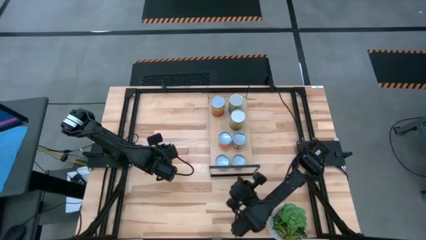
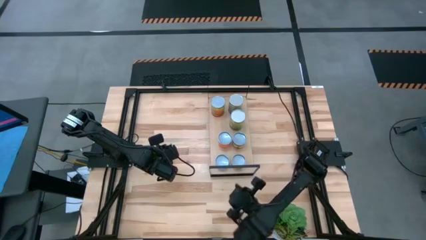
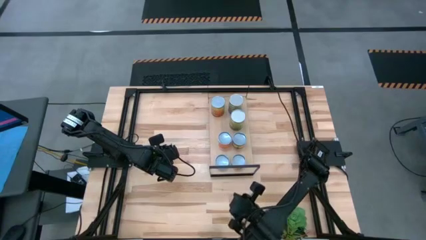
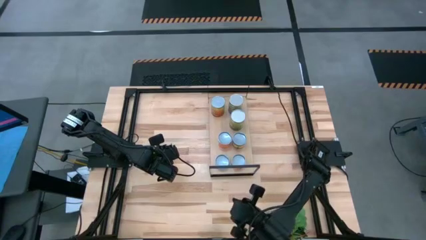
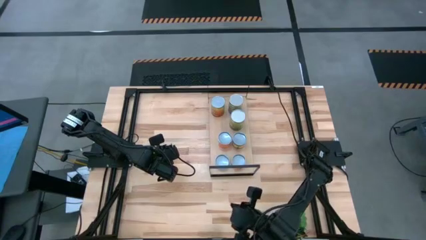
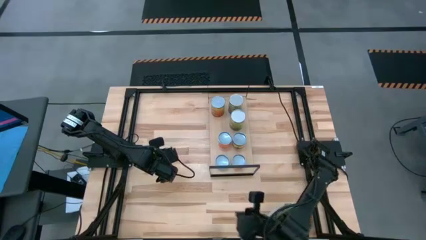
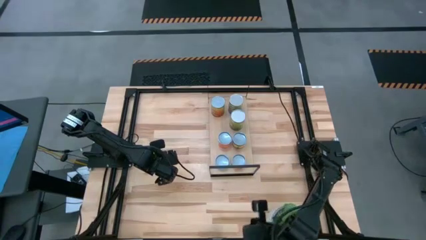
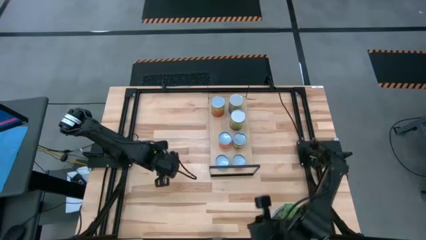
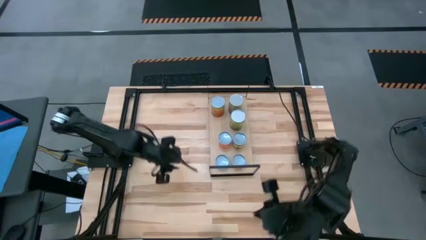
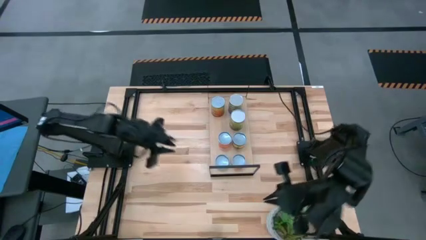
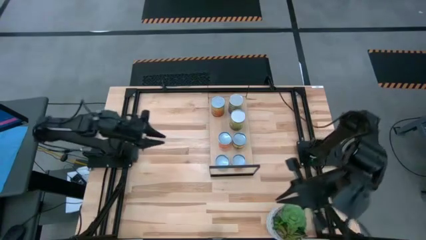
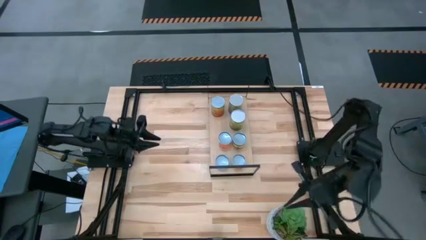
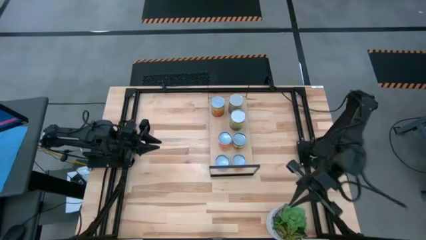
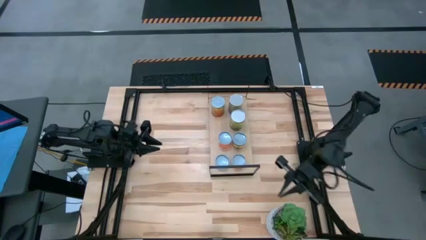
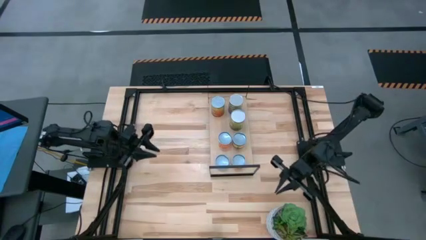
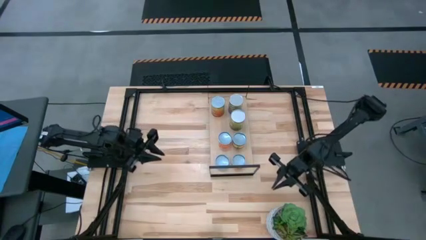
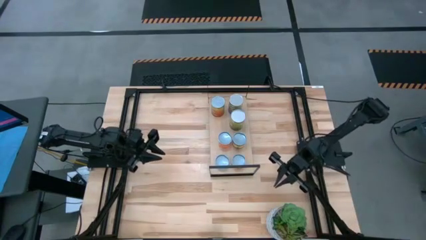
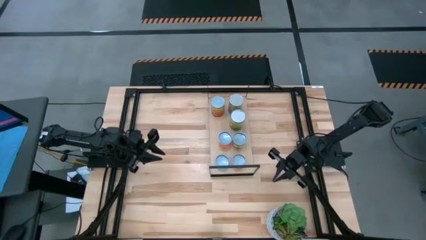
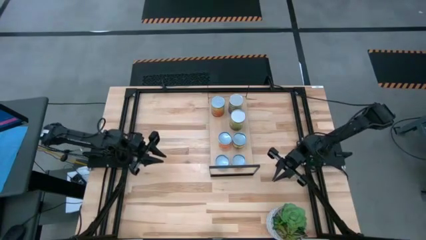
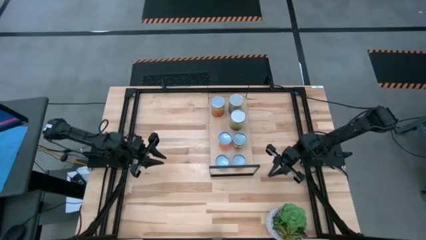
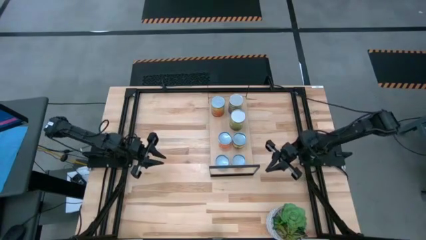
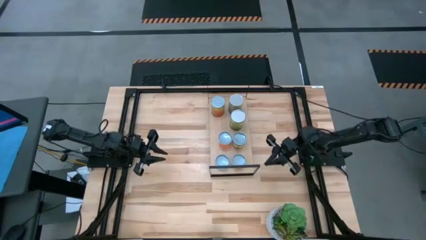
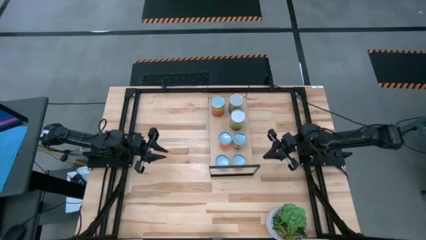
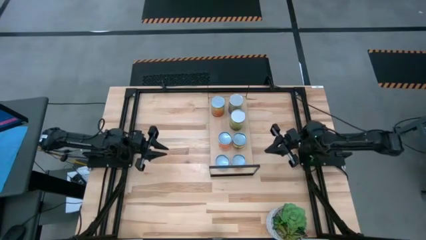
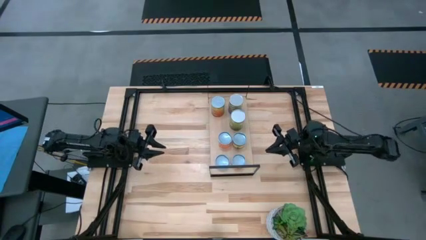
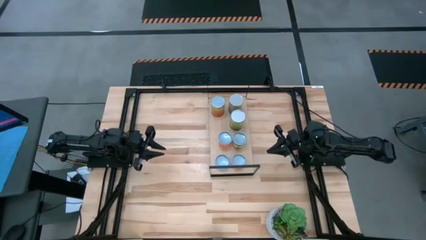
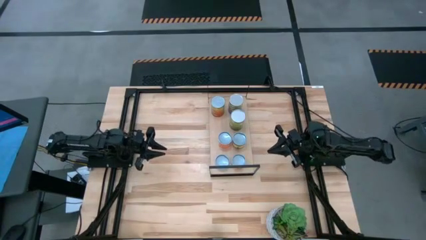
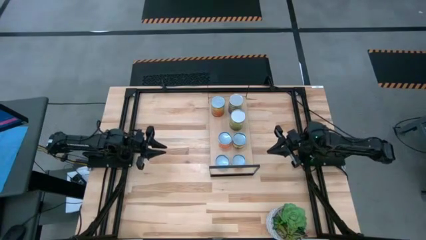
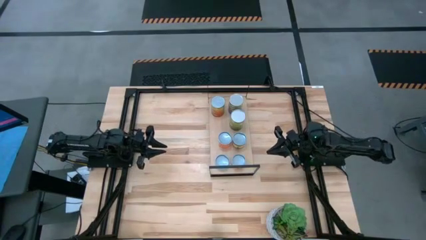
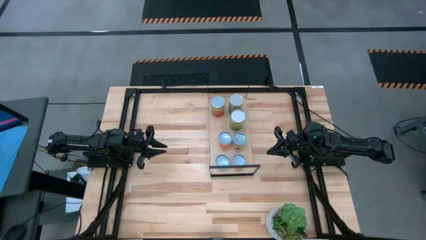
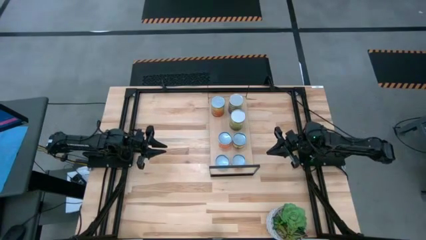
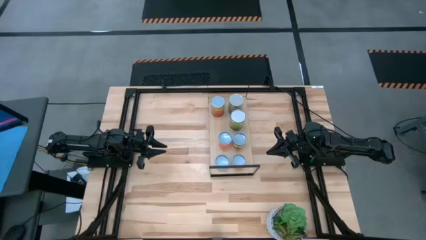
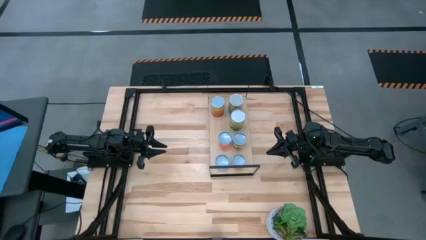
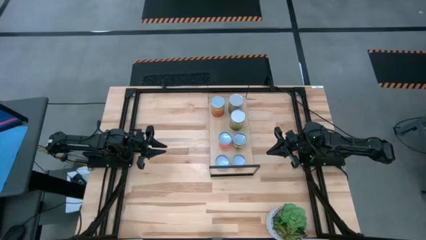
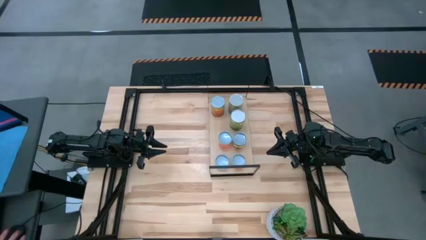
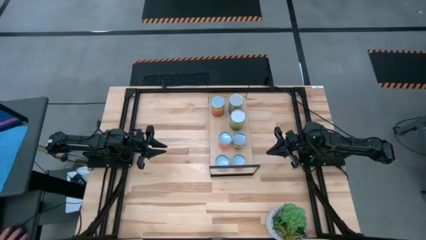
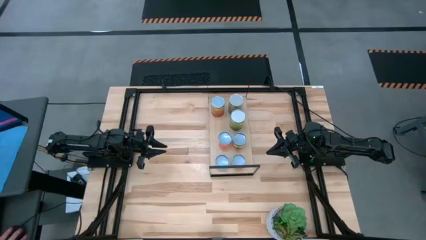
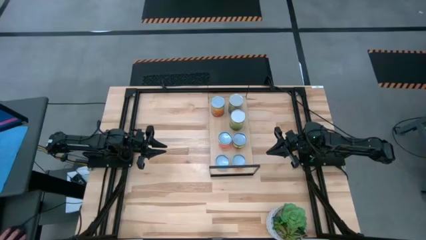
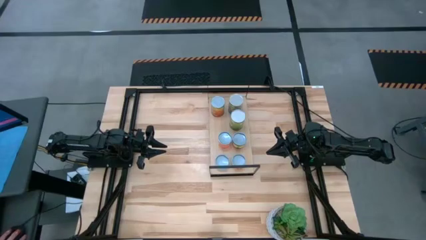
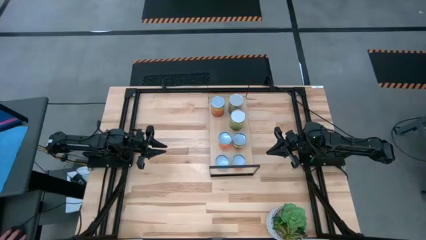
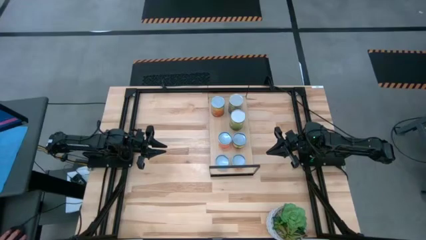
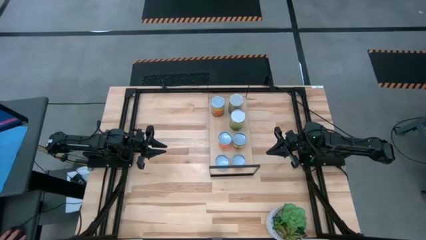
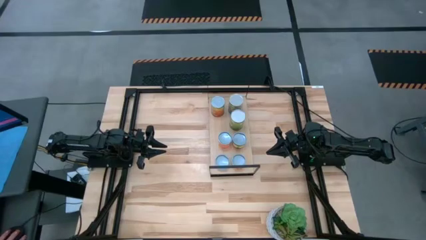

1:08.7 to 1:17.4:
Task: Pick and place cans onto a shelf
Return to Home Position

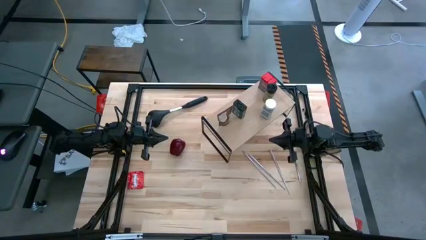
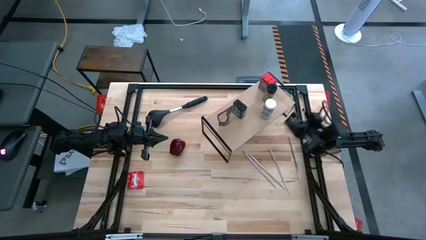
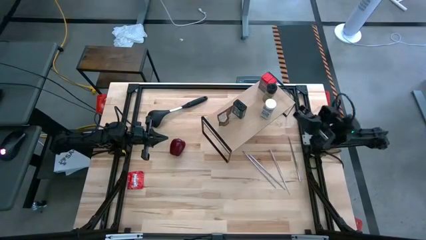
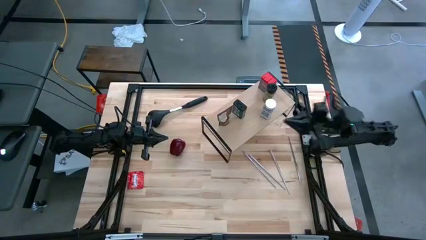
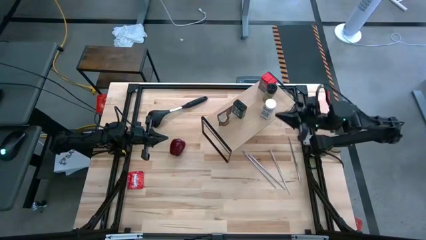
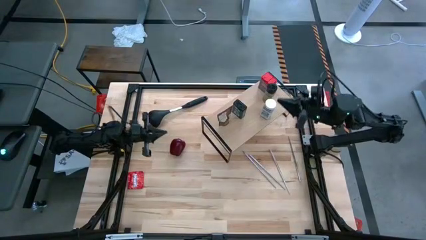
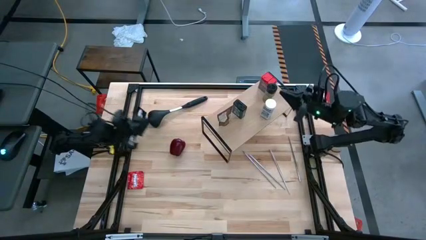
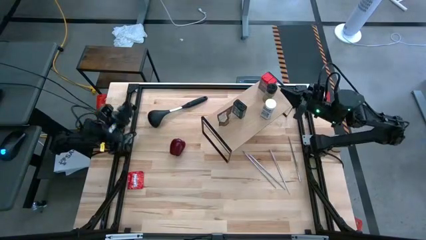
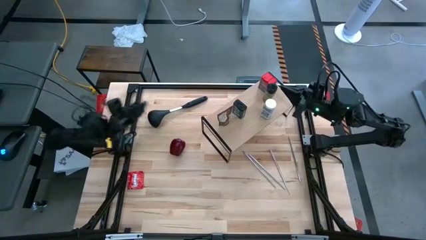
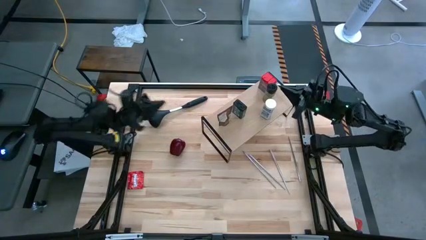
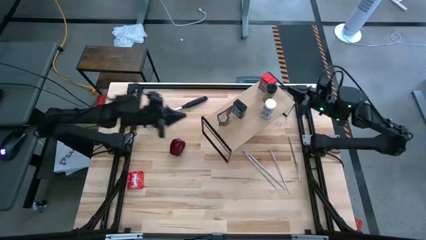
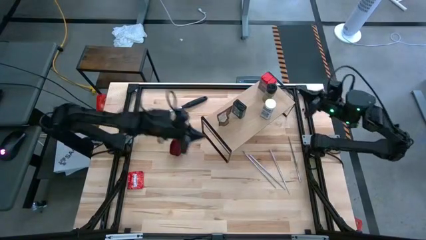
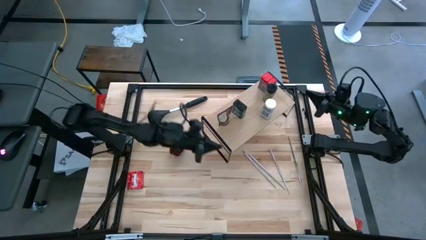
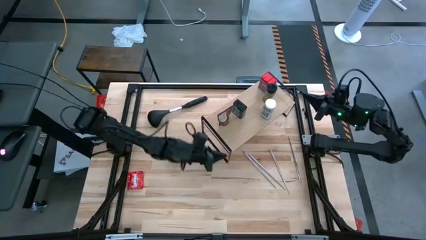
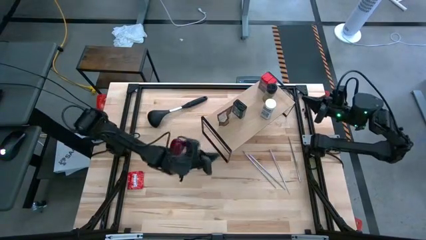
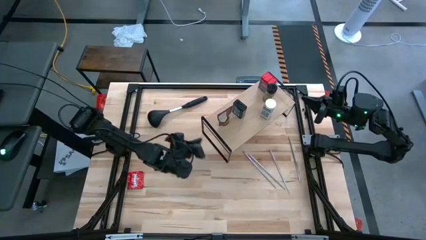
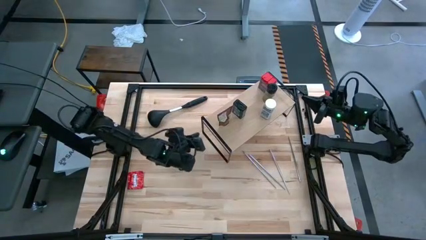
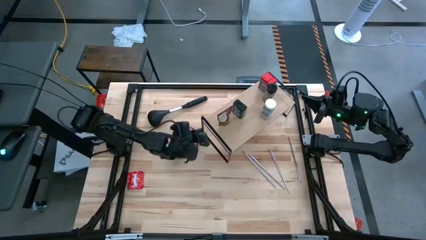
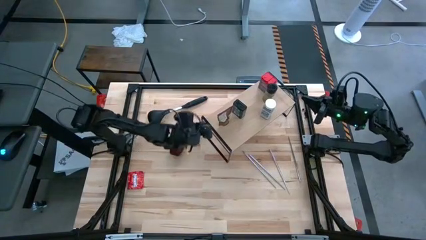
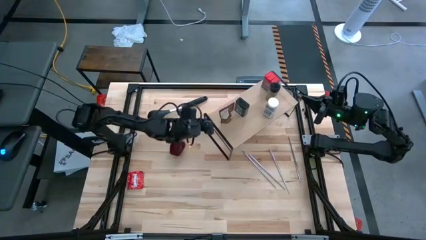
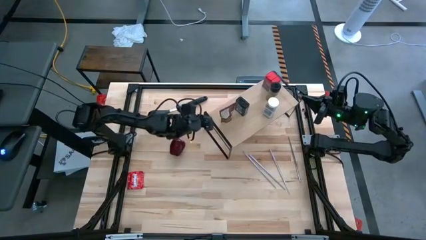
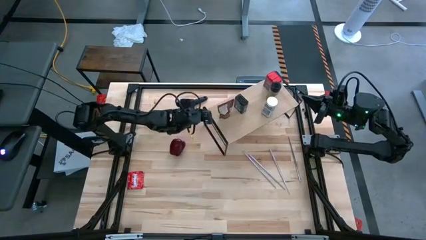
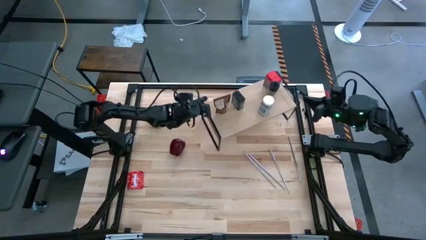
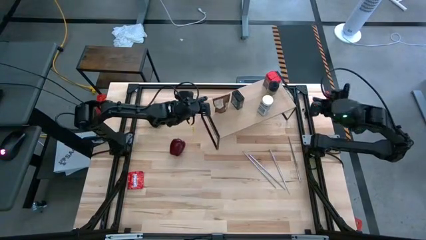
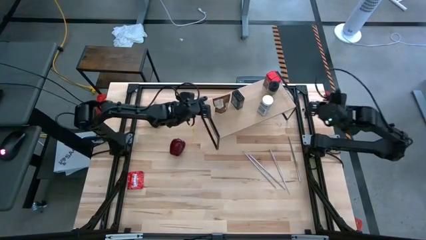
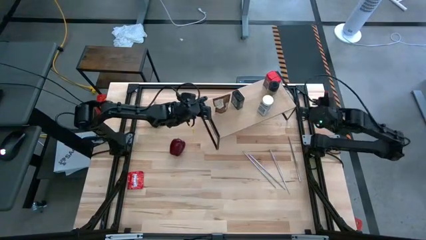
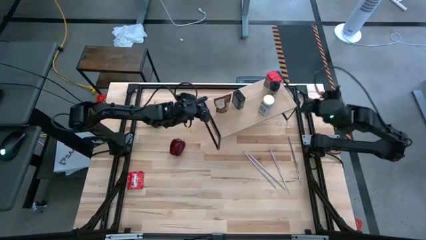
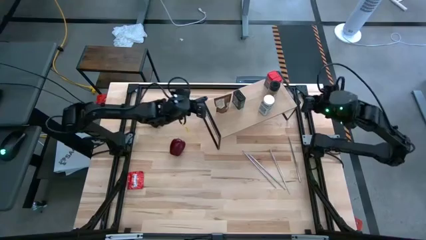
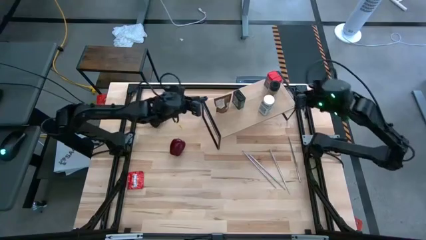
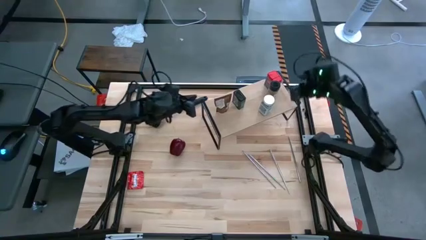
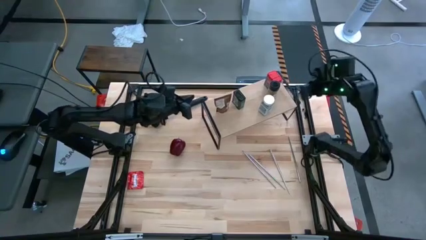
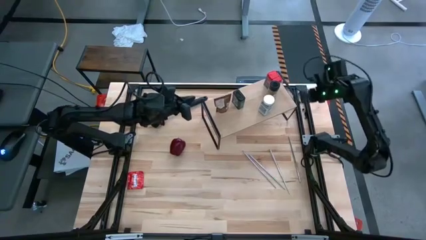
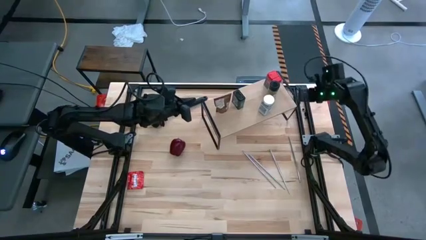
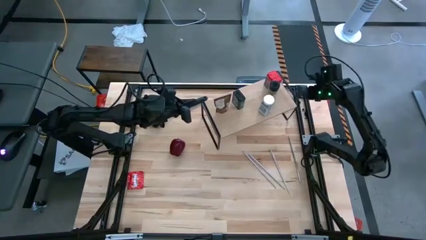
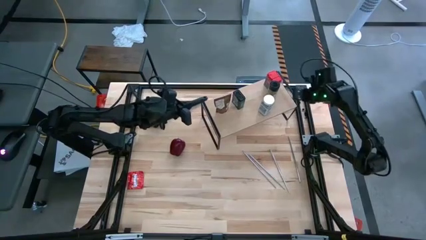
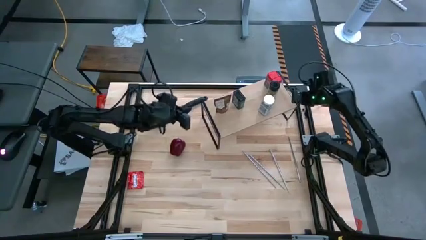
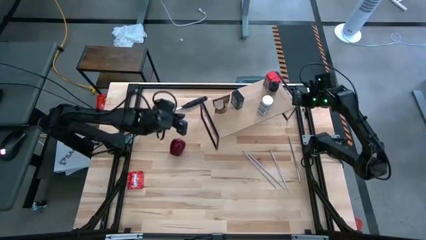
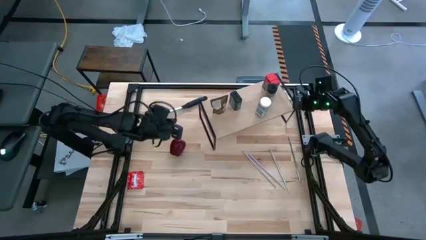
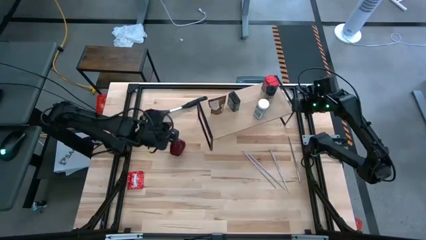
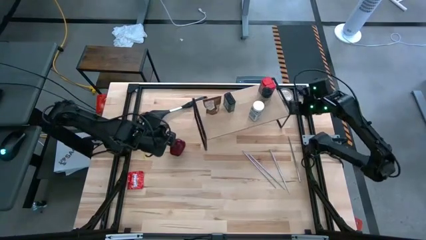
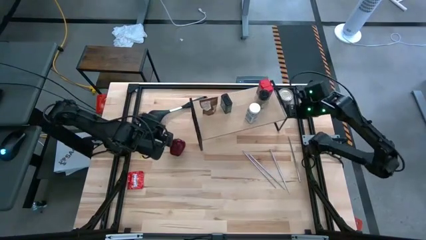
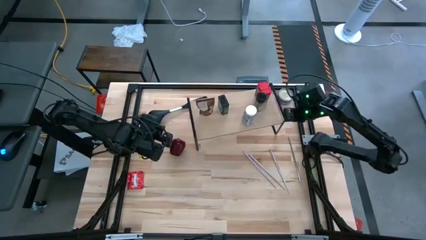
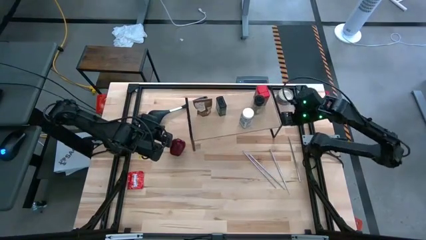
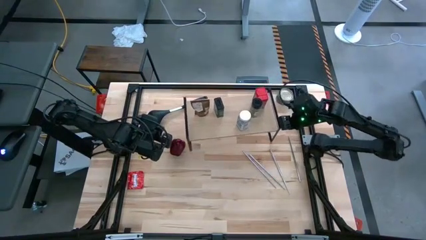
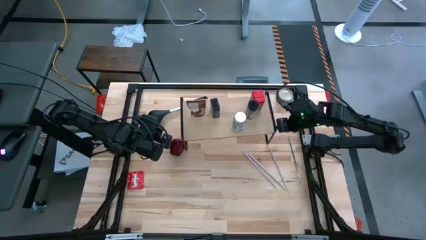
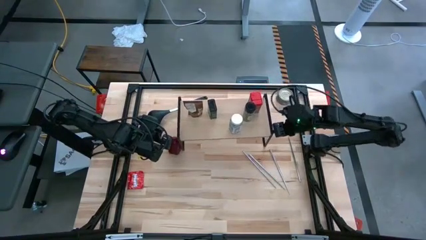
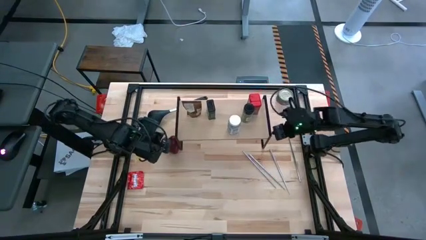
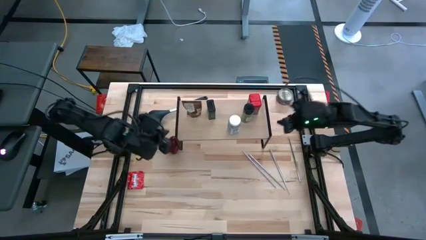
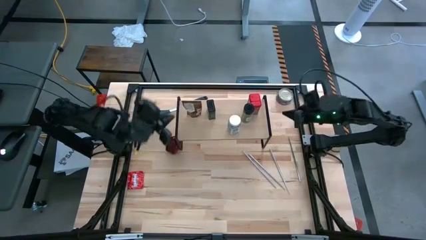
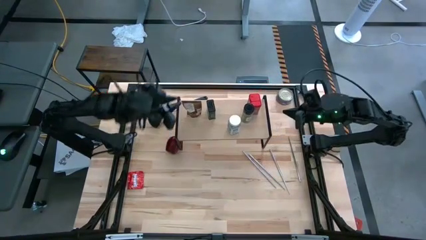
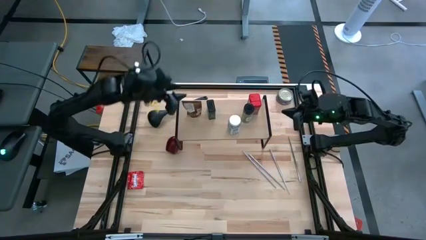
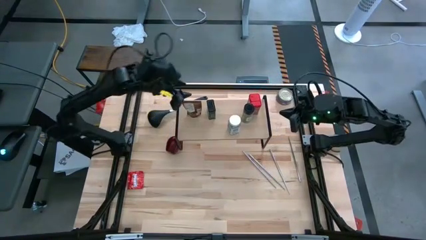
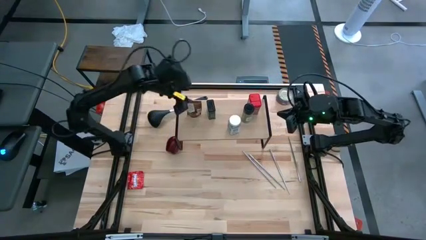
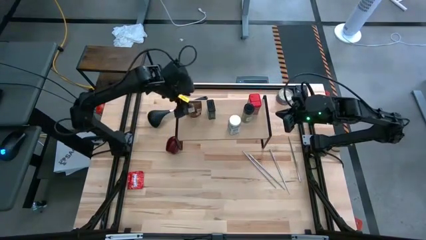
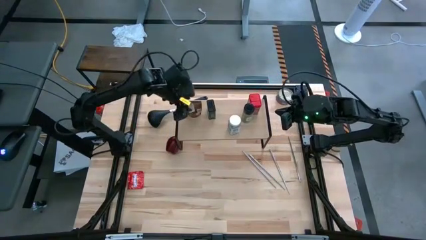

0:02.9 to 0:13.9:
Task: Shelf spices
Move the shelf to the center of the table
